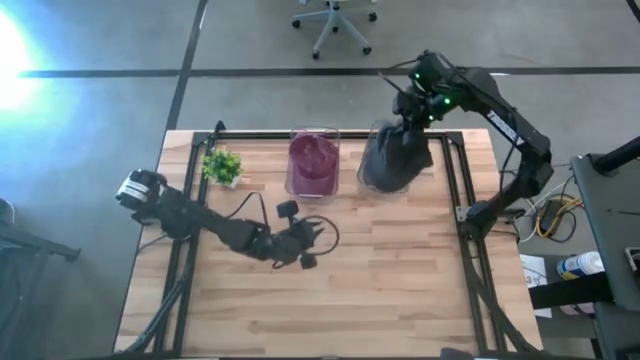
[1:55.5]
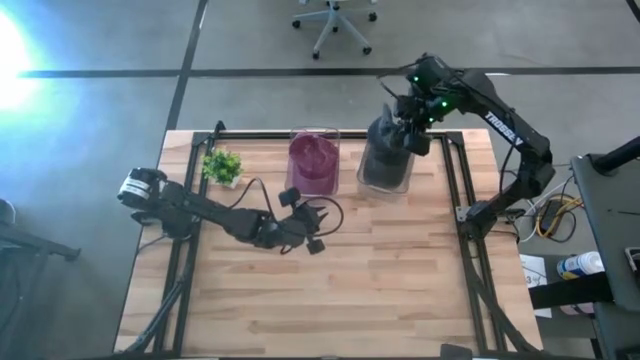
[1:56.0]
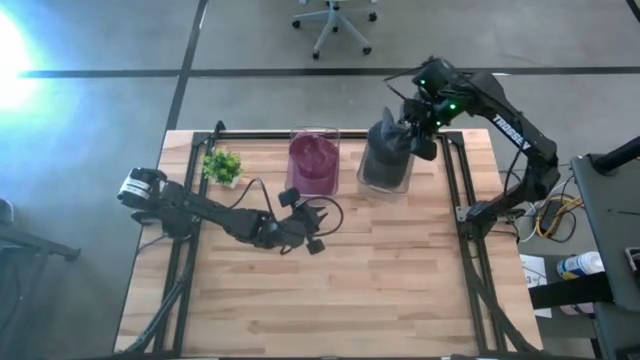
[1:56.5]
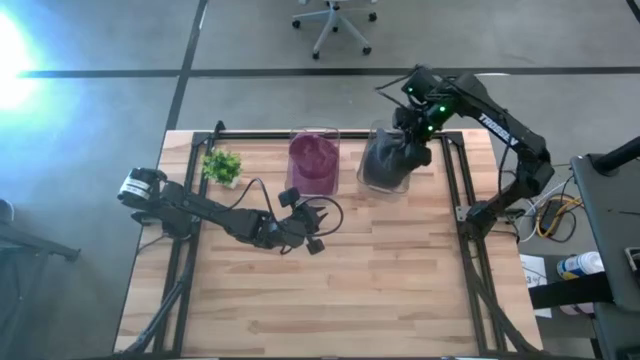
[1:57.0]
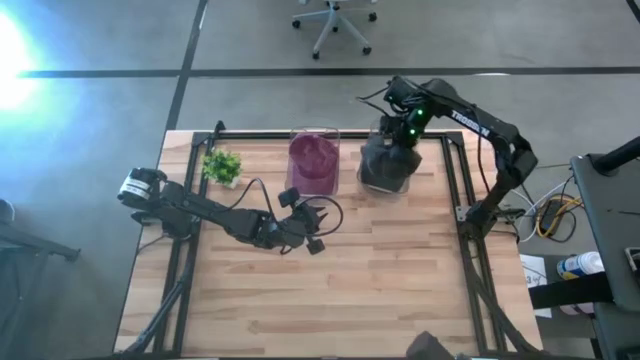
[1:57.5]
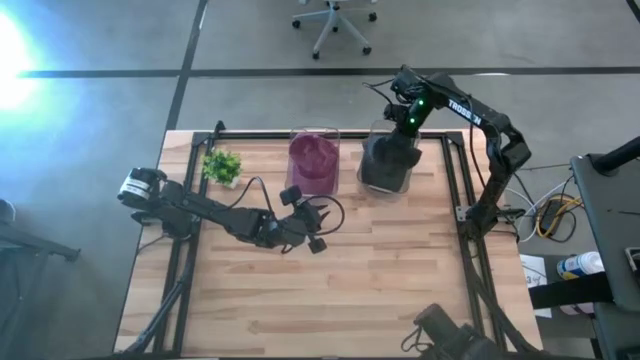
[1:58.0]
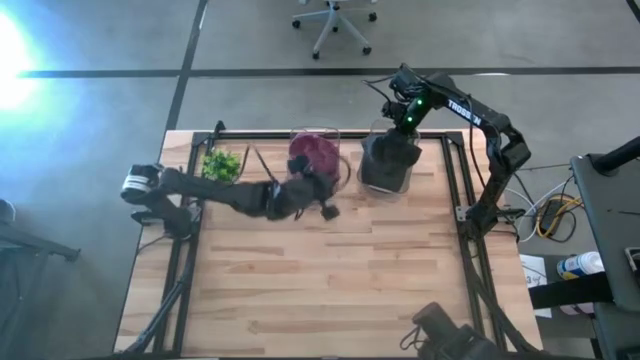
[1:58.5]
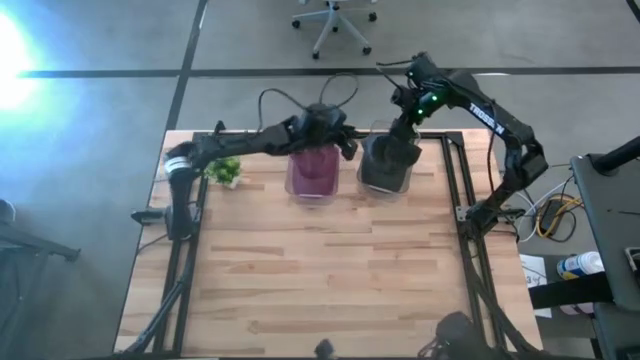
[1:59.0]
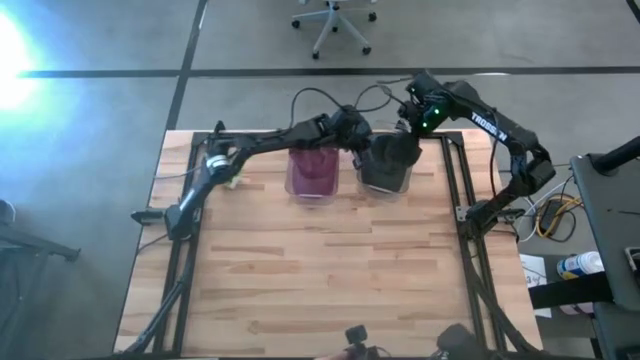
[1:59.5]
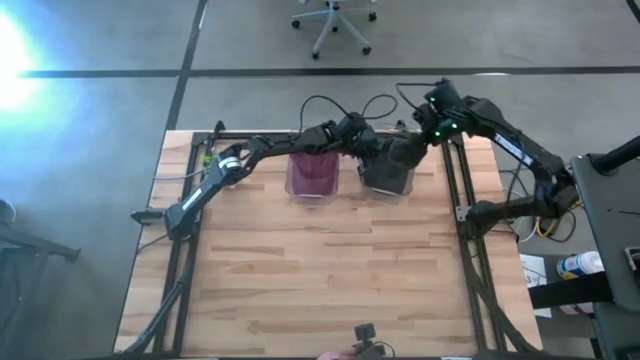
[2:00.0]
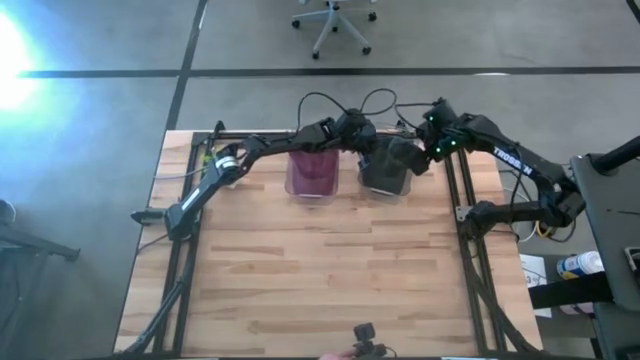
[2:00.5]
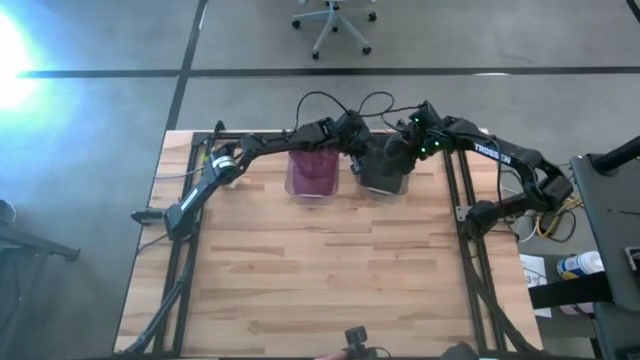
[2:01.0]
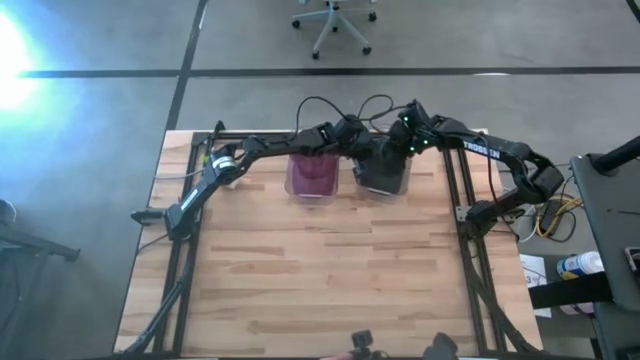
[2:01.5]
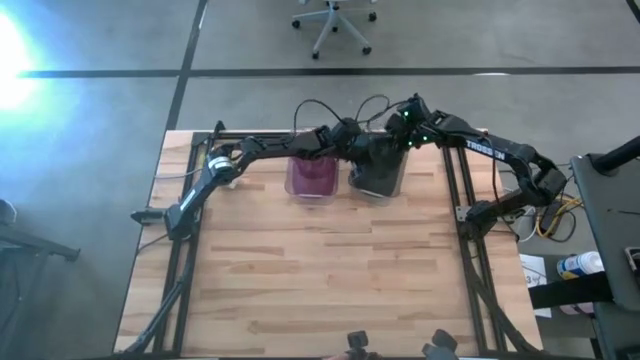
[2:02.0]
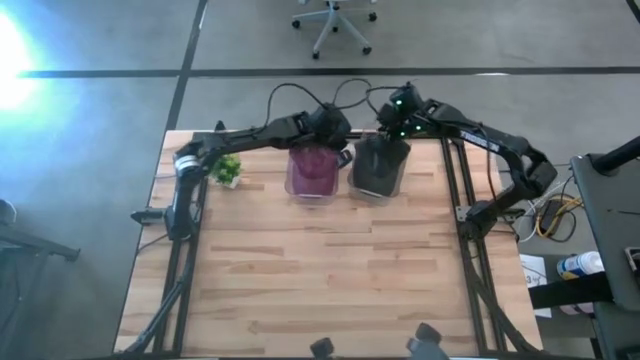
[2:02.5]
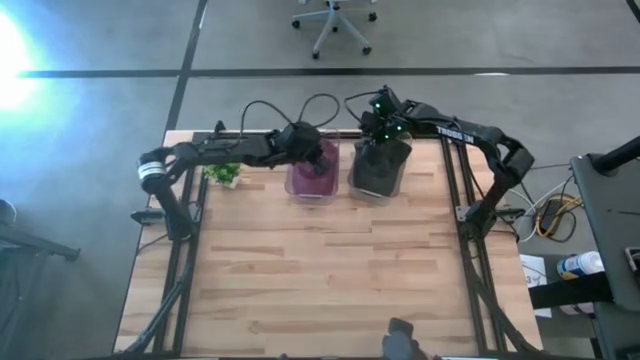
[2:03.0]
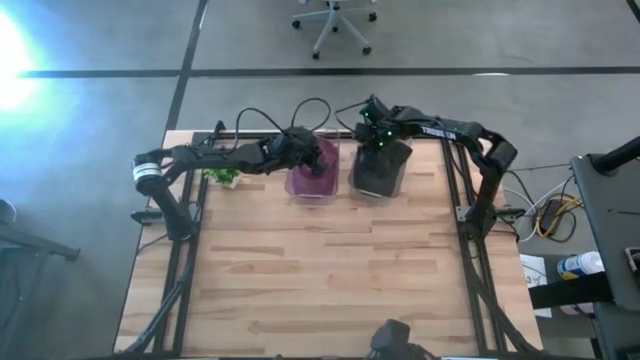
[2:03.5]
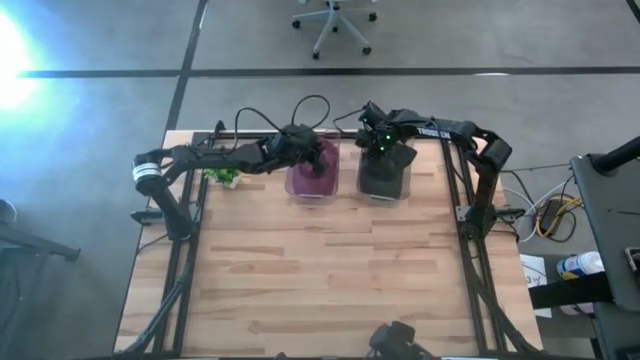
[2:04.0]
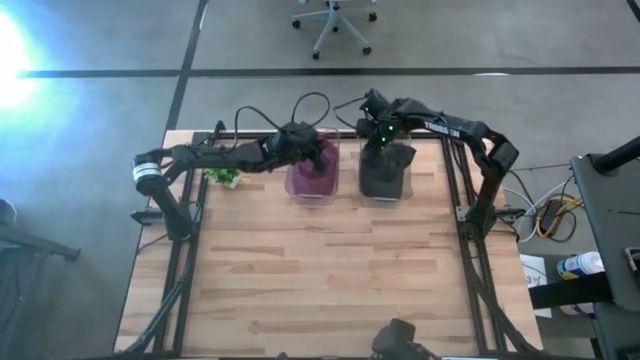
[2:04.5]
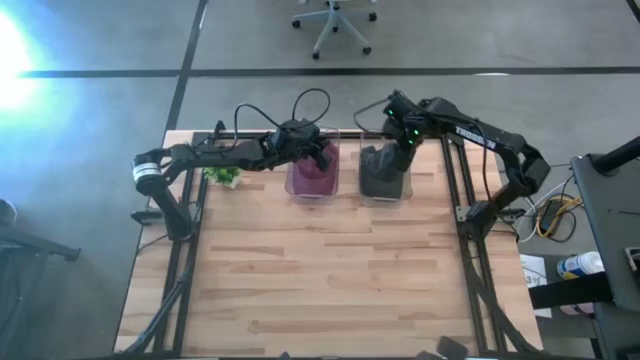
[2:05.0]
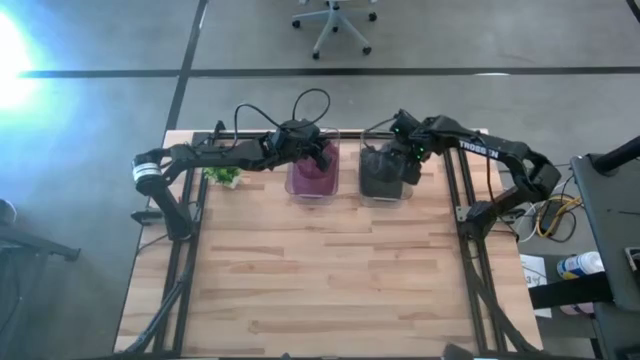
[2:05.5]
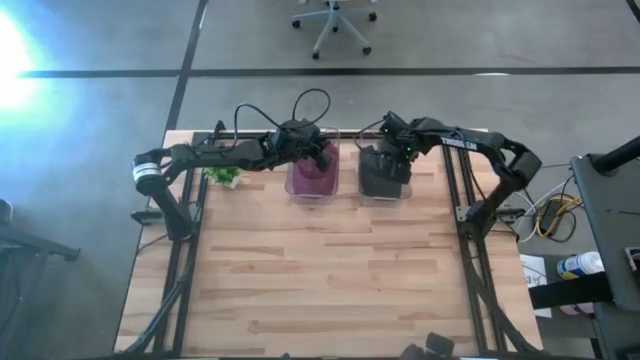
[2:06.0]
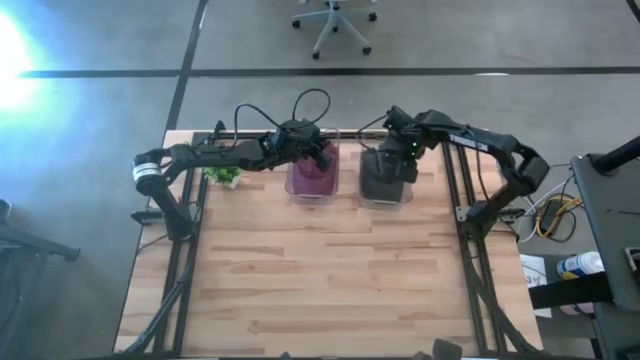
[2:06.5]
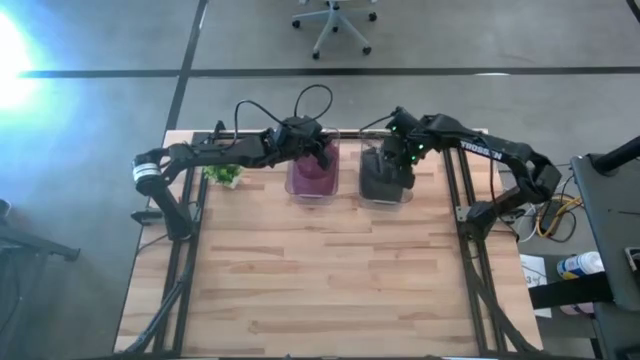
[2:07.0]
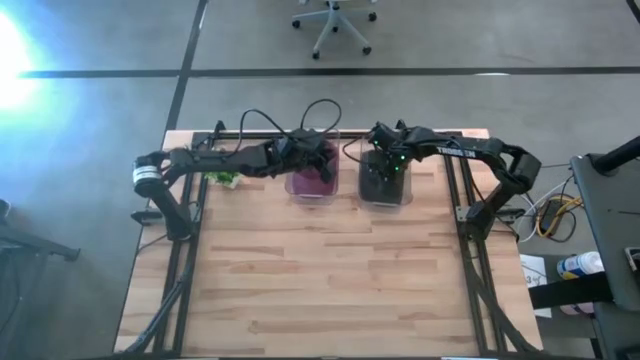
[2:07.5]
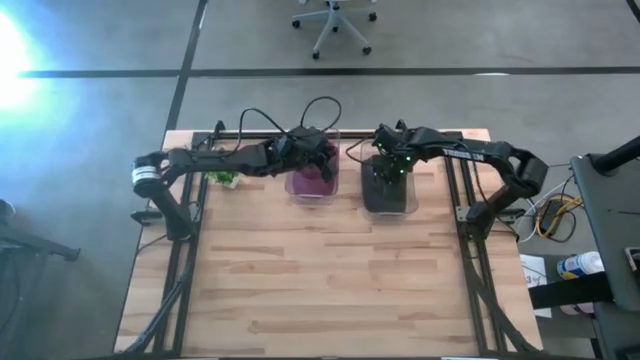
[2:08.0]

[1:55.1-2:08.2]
Task: Pick & Place hat
Put the black cap into the right transparent bin

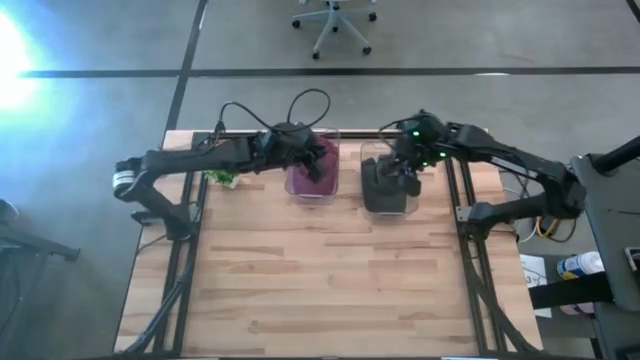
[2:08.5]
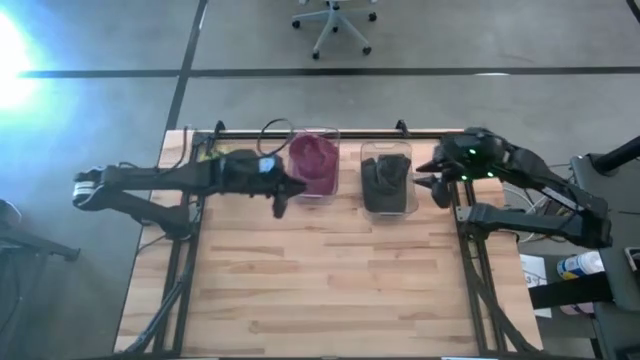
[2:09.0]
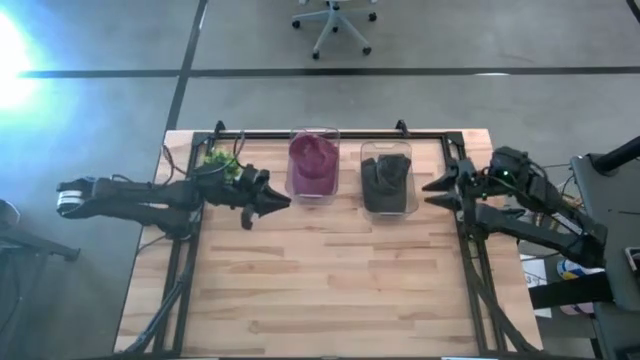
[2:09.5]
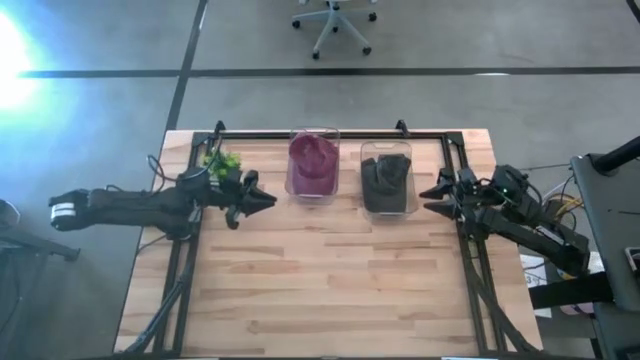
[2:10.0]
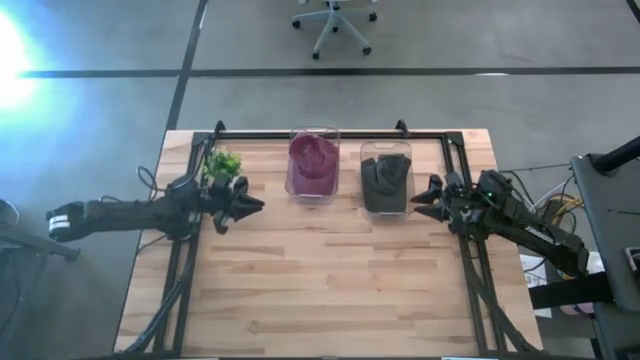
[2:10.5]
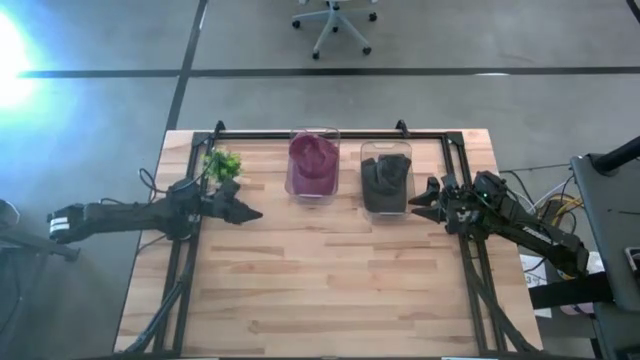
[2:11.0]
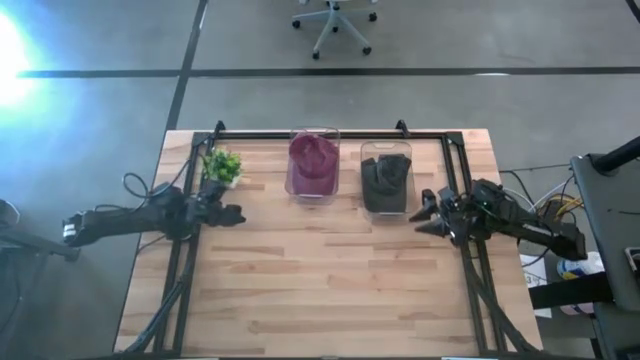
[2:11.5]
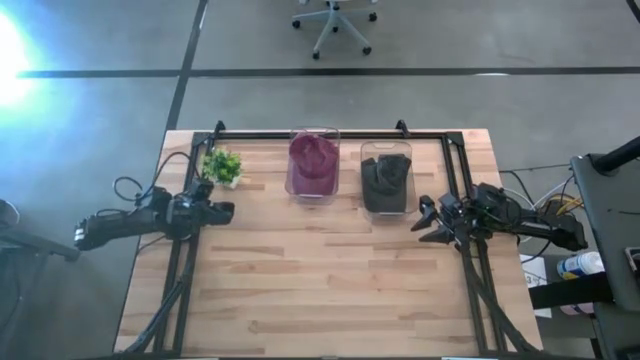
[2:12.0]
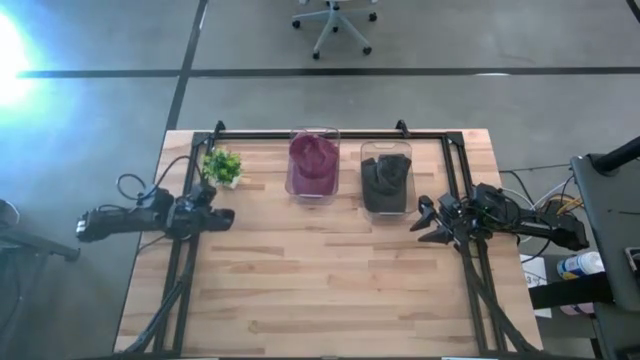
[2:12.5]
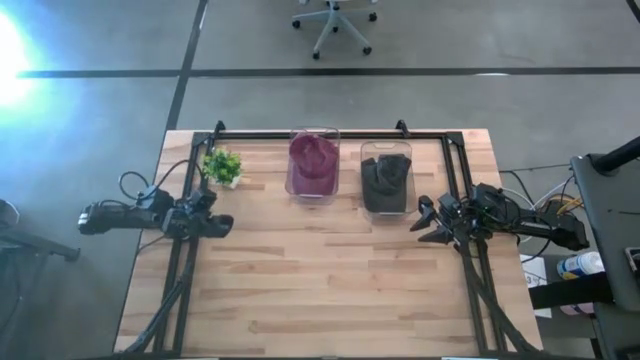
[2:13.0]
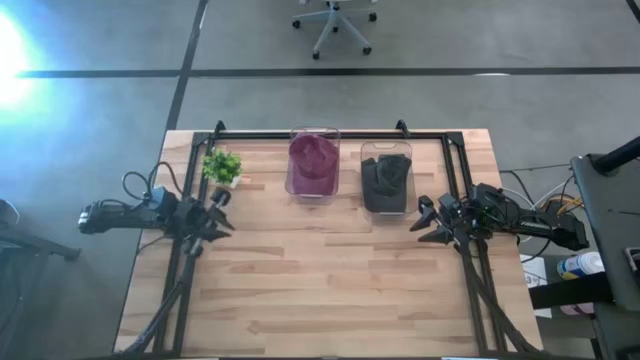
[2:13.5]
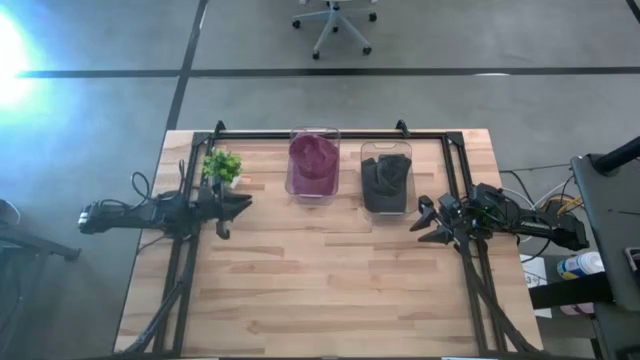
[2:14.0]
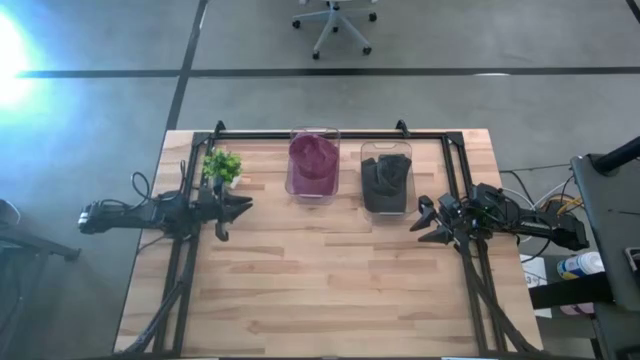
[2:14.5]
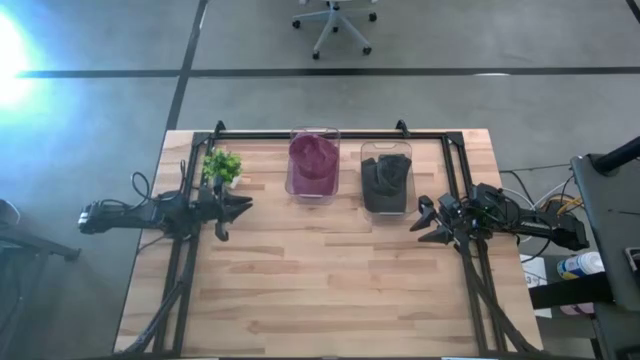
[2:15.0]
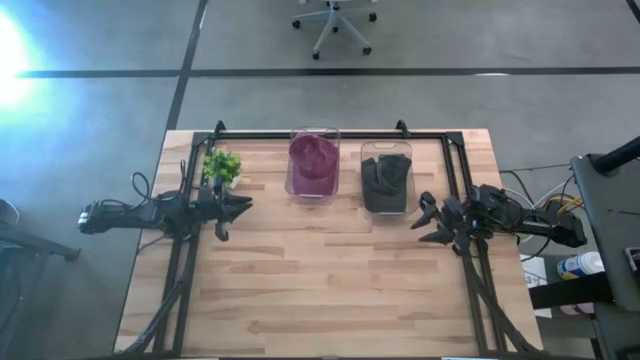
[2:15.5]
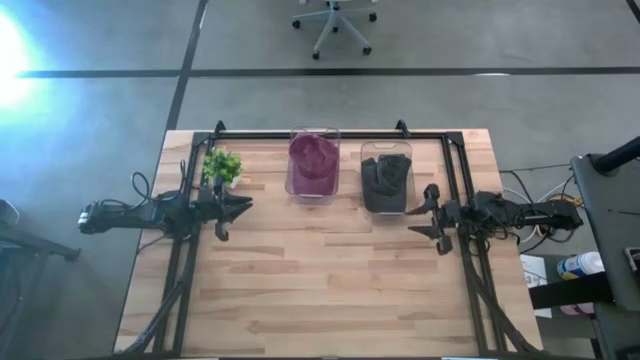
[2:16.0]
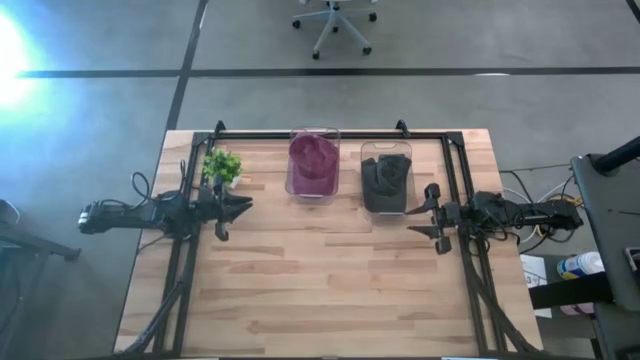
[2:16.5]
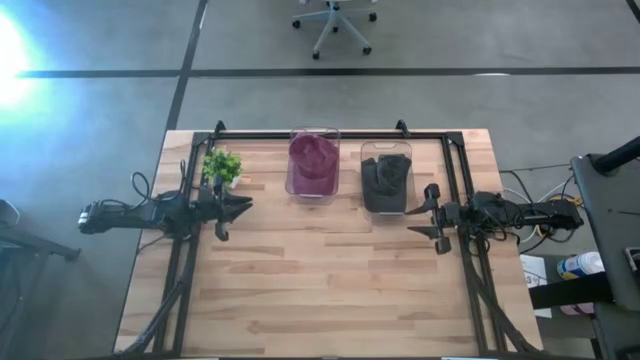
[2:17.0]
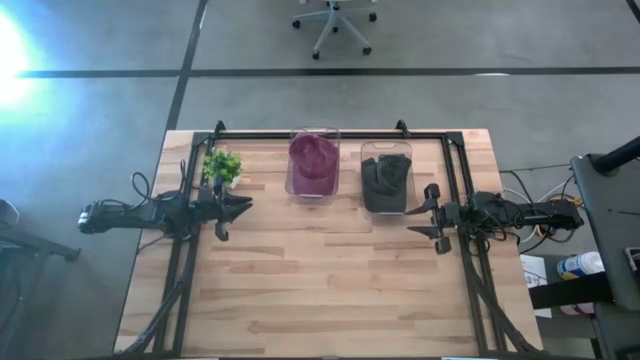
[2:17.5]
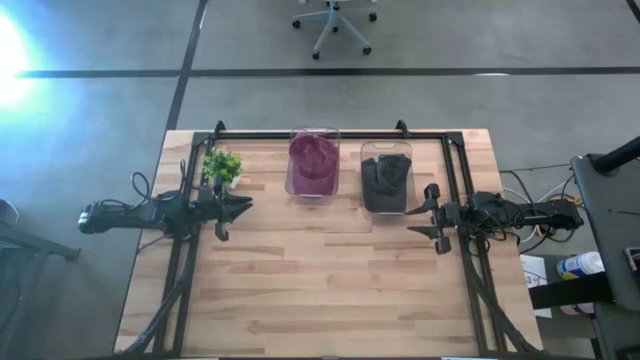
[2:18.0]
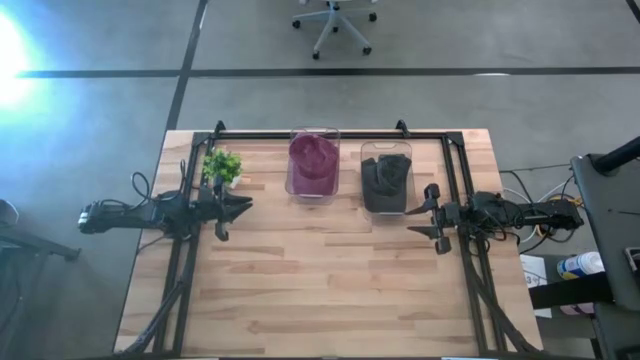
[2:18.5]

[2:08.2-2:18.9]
Return to home position
